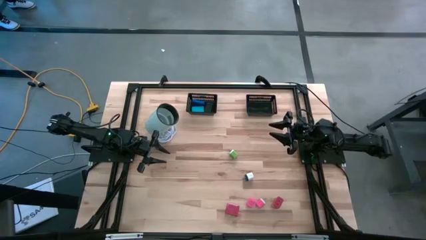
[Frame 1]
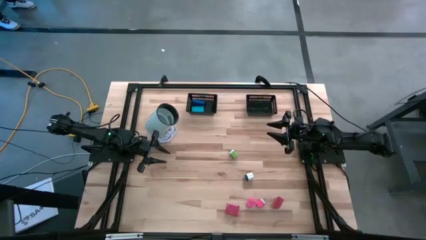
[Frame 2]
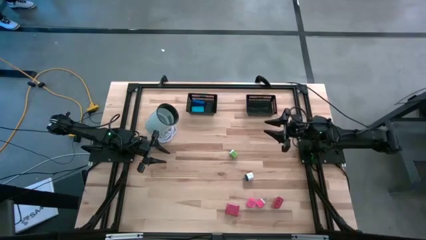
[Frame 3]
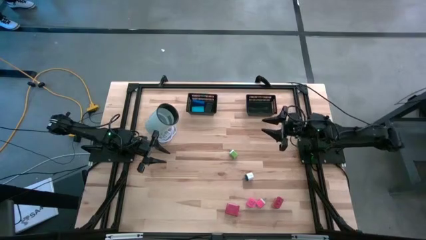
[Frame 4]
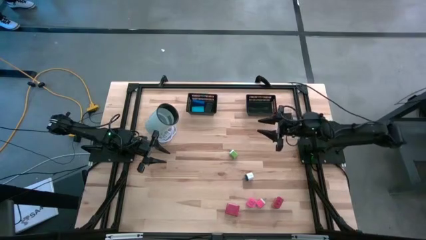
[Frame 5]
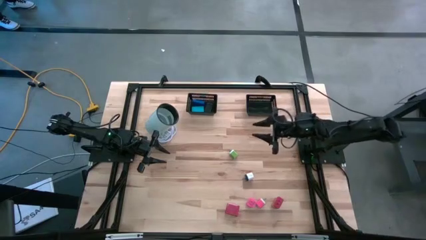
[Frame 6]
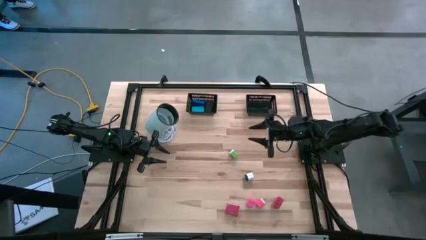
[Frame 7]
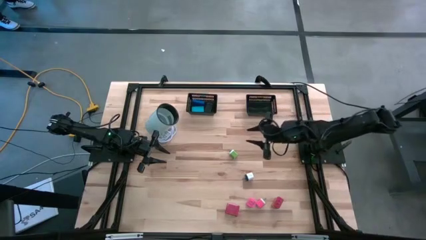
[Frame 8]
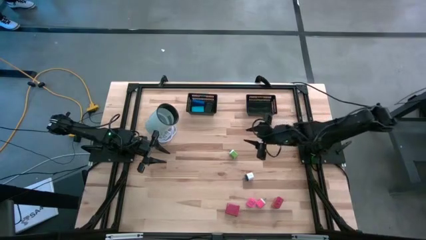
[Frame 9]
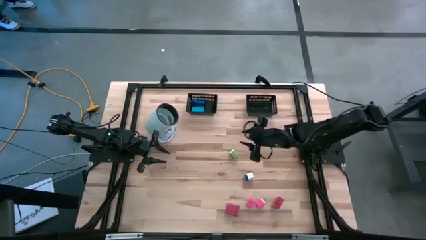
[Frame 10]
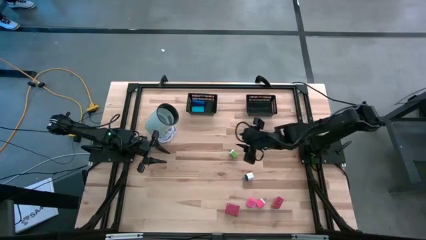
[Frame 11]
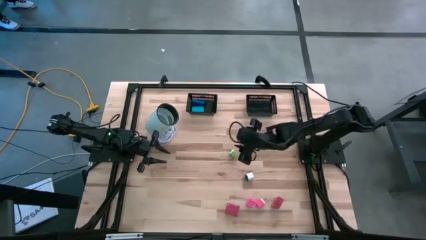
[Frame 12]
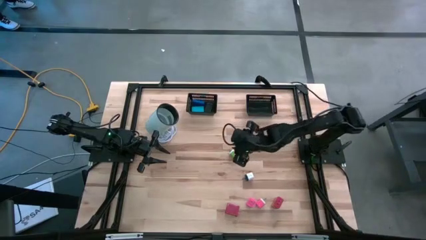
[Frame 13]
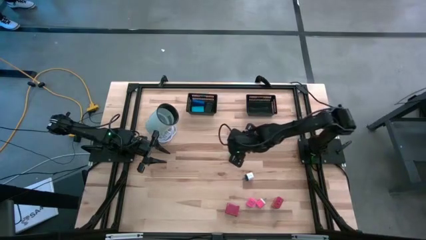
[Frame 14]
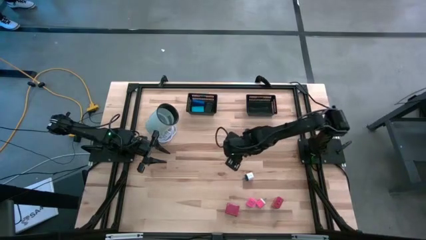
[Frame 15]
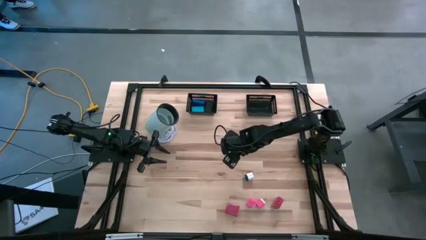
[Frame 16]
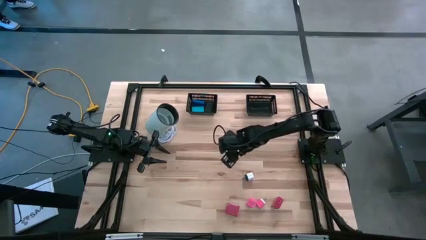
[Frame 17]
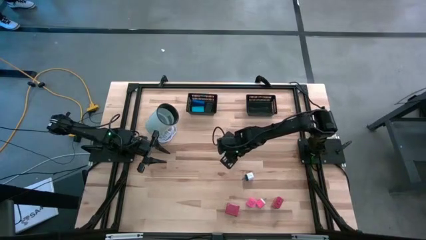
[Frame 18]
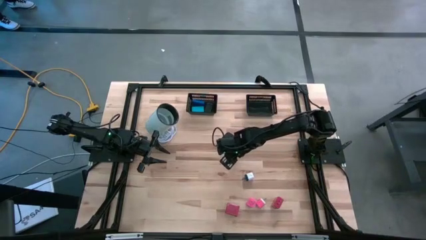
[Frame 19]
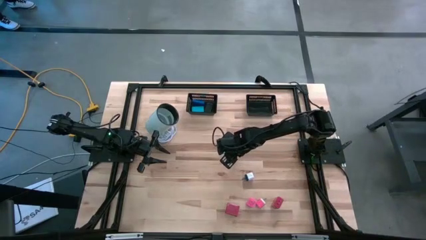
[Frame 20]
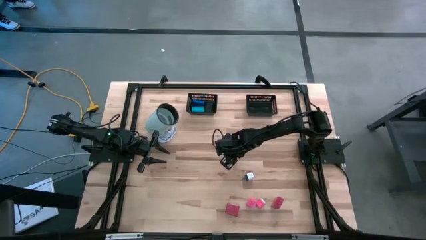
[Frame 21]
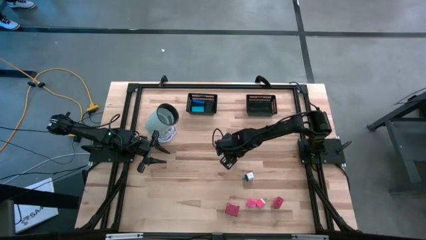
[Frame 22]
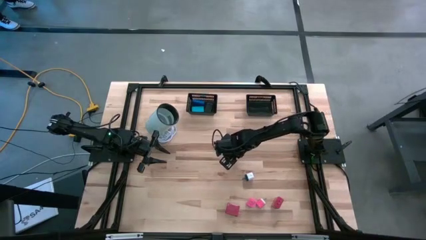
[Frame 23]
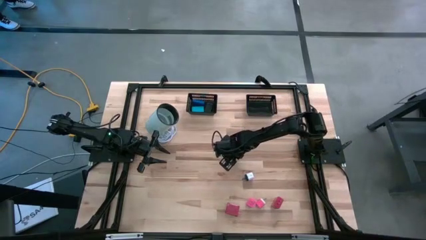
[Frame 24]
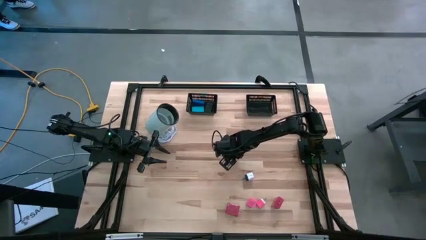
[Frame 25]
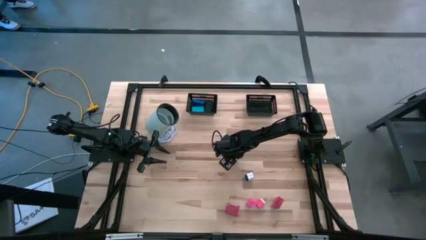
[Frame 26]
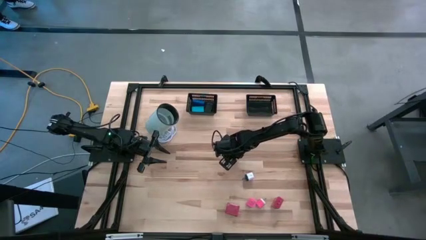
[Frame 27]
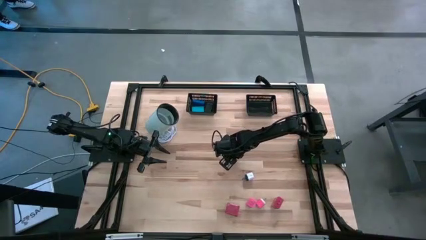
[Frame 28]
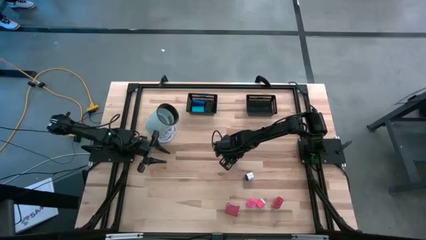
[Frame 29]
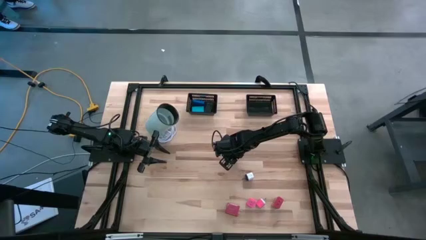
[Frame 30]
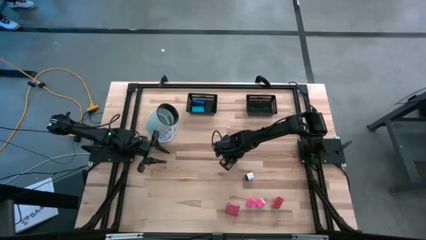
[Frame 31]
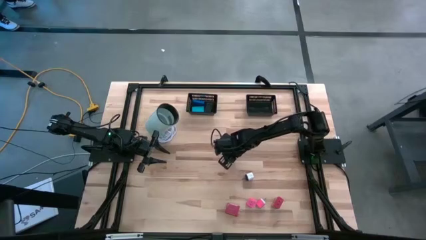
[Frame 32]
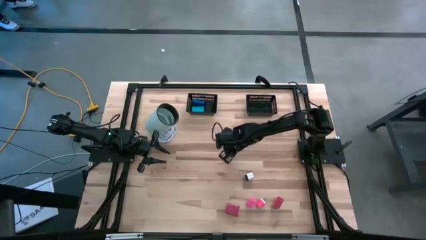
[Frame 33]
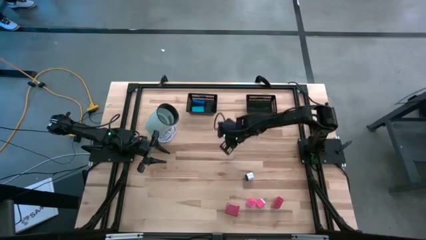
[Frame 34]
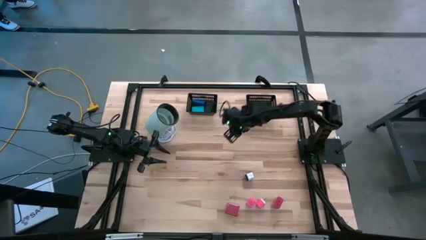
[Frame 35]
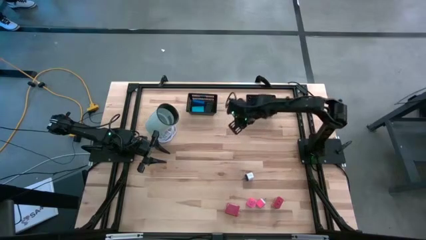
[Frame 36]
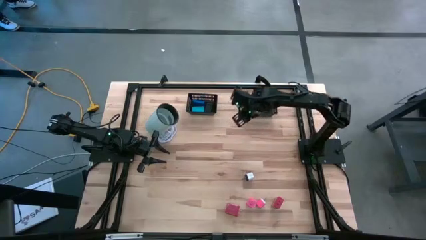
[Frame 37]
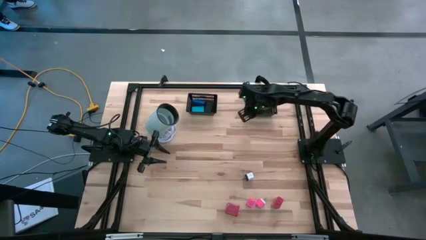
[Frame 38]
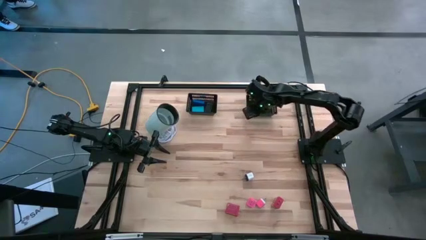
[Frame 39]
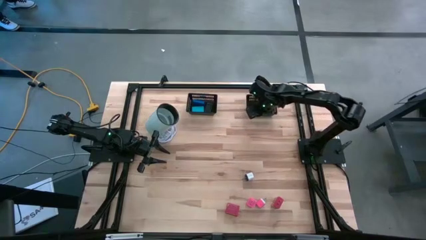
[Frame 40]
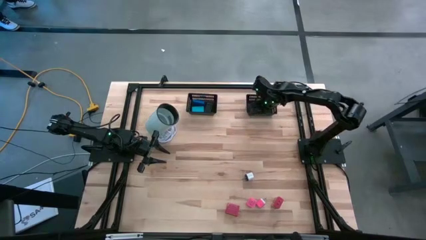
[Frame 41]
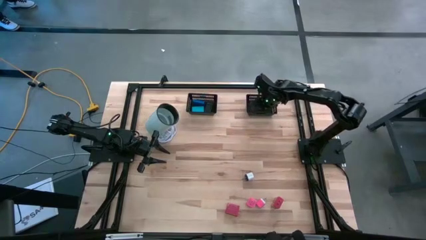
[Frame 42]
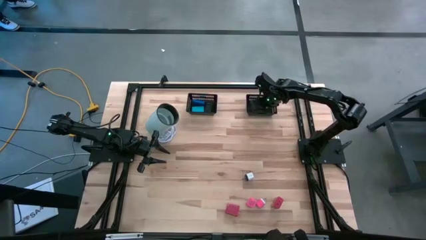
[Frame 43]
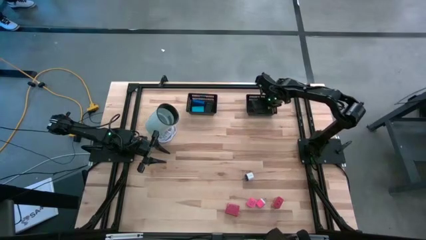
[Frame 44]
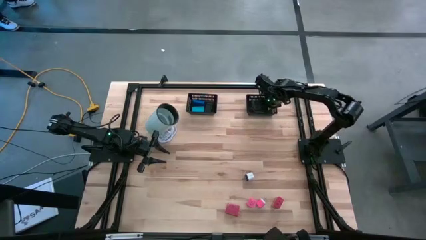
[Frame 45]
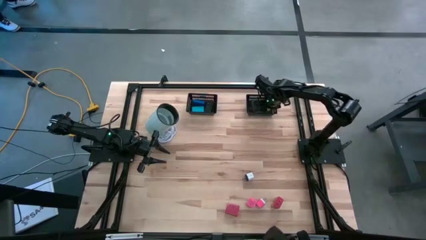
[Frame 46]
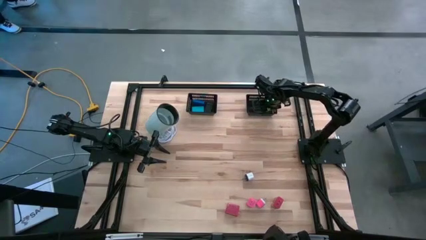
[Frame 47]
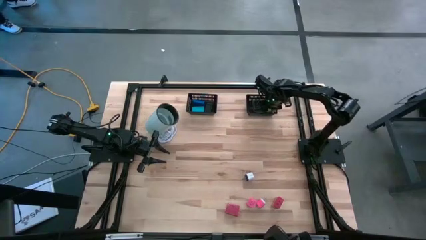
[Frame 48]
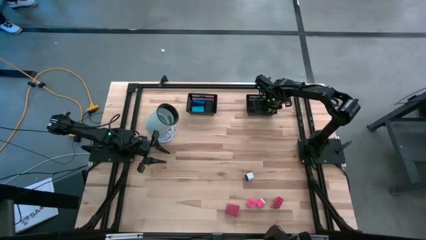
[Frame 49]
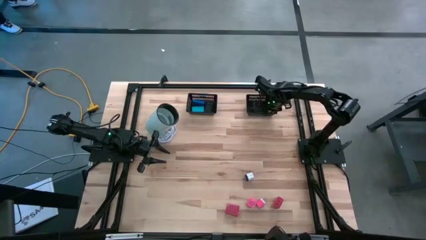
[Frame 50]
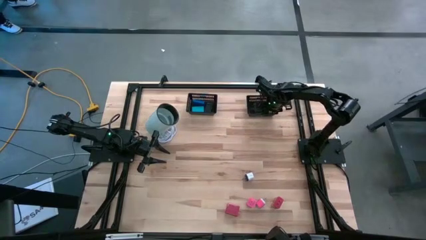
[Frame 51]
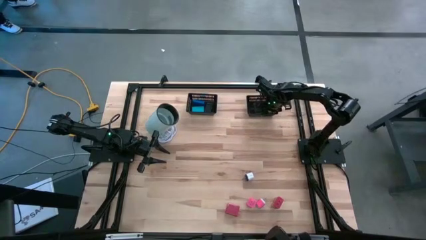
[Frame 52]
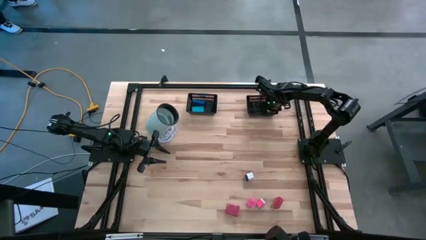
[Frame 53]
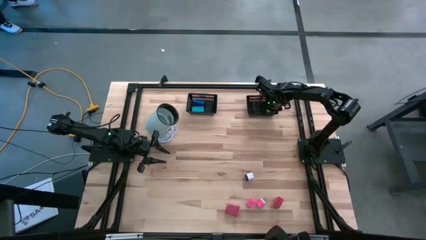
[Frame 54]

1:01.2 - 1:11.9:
Task: Pick & Place Office items
Put the green charger adapter into the right black bin

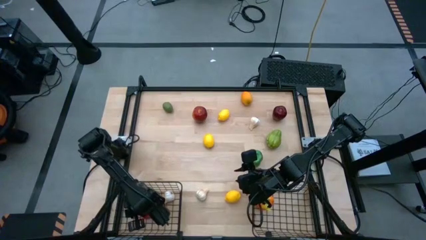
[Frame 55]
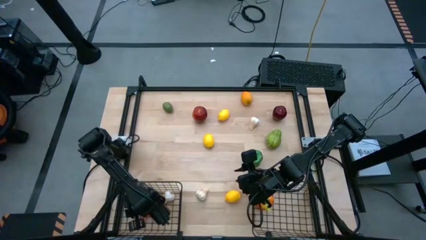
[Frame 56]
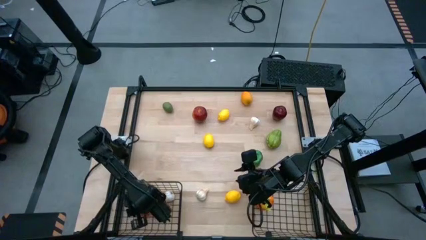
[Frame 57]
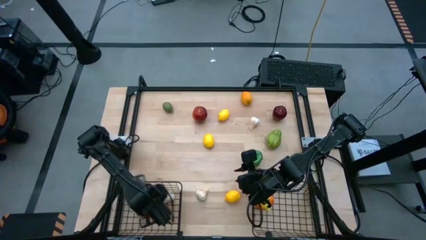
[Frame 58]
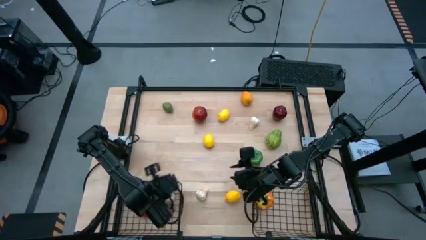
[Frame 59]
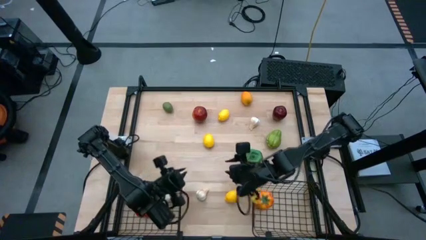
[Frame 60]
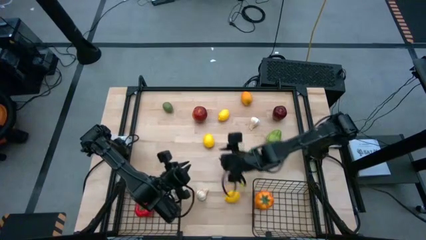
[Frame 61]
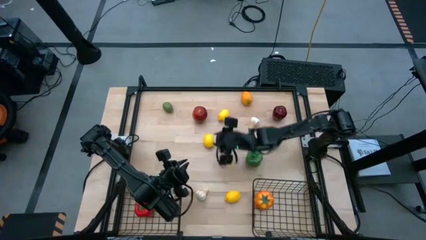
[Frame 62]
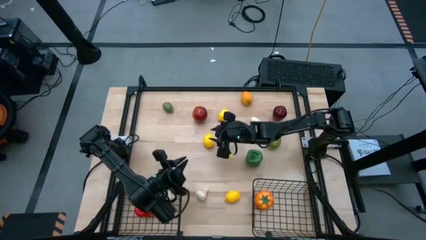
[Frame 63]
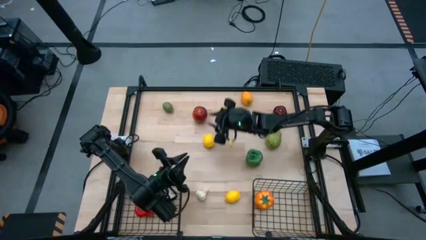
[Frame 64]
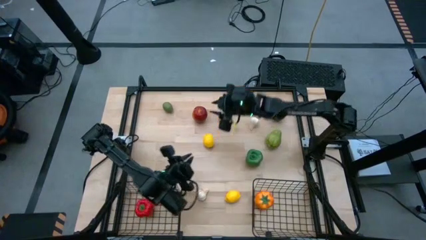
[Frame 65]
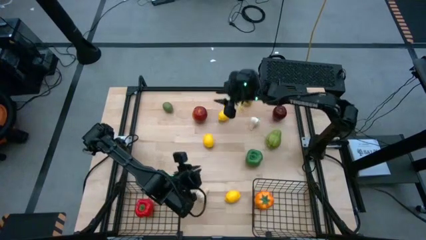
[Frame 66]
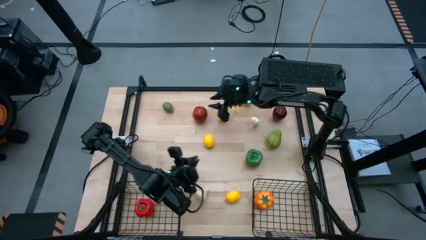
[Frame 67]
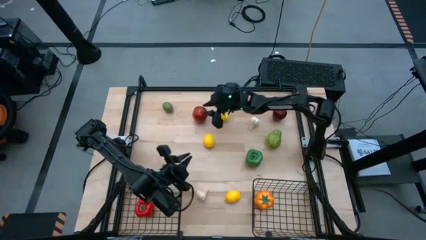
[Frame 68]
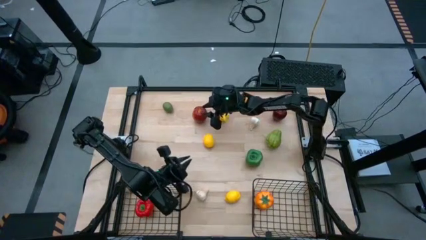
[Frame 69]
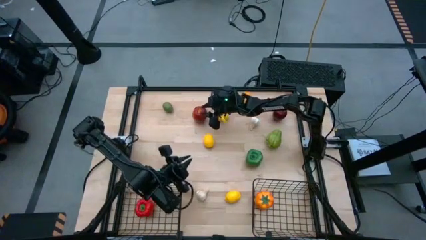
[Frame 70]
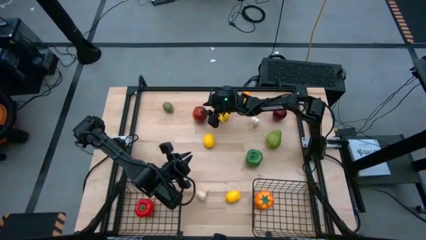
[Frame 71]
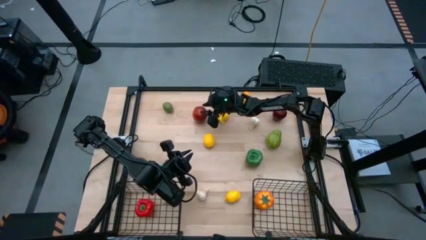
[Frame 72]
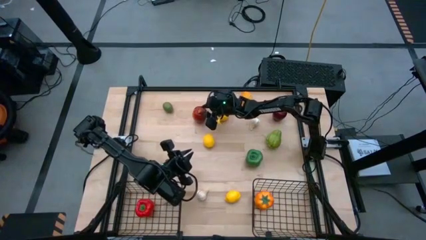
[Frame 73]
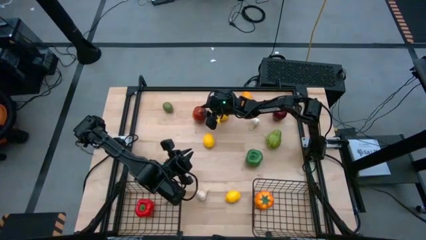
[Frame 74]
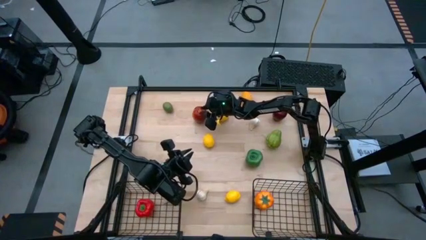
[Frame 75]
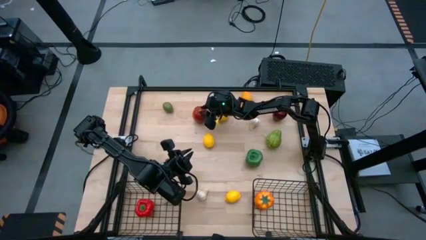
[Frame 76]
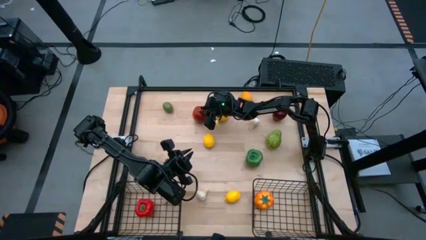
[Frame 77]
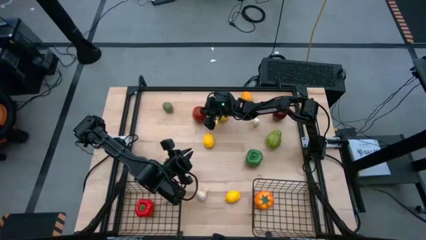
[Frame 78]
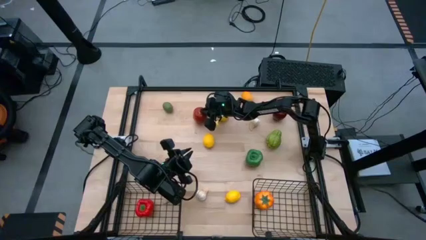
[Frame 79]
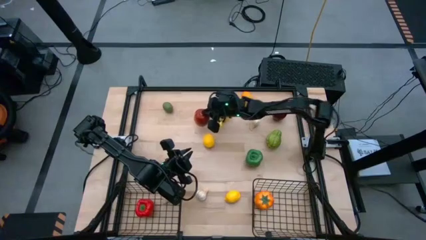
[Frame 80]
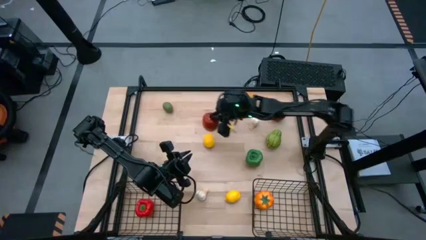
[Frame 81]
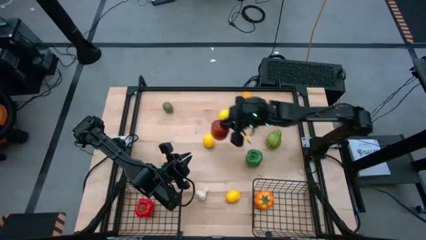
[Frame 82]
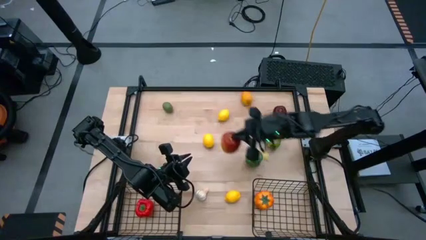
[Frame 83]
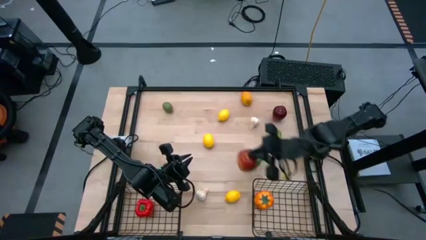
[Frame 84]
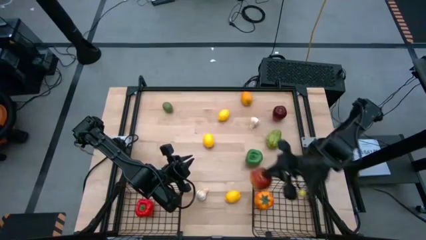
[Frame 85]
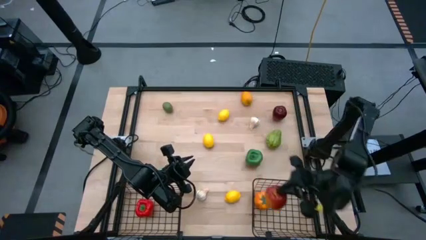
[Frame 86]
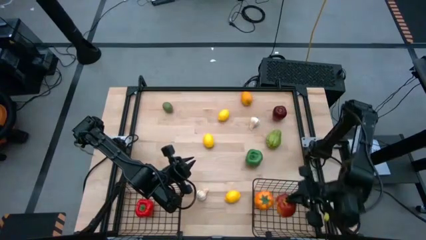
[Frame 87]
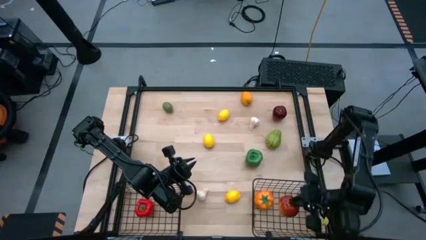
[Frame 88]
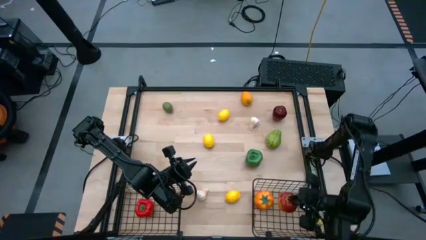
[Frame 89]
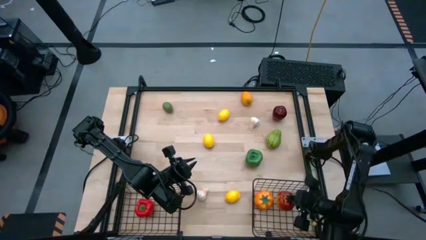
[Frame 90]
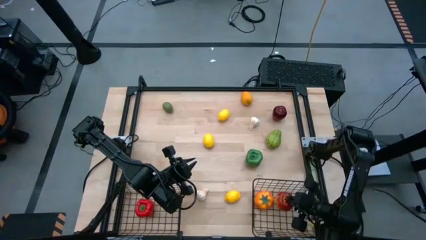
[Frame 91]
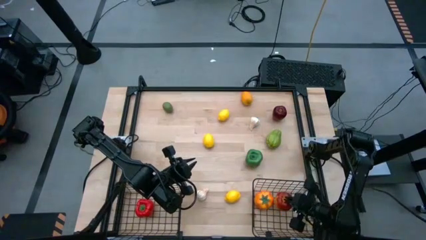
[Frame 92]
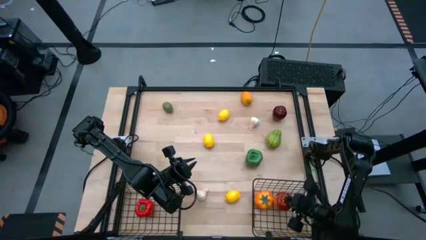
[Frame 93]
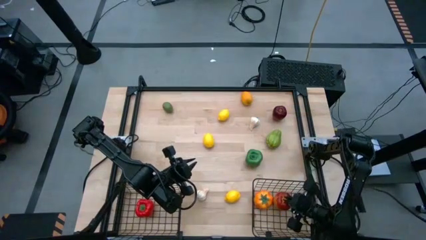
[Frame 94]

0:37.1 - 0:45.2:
Task: Sort produce into baskets
Put the left red apple into the right black wire basket
